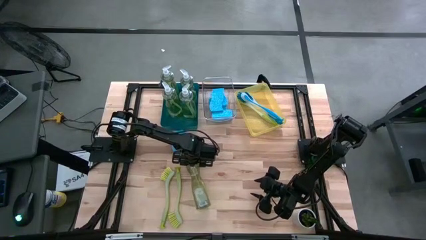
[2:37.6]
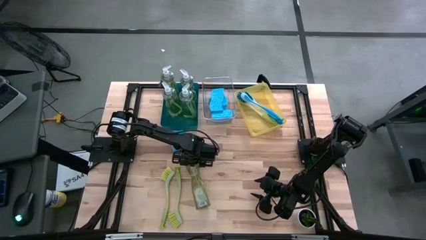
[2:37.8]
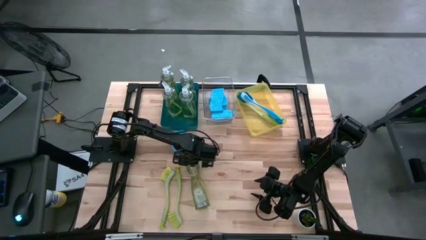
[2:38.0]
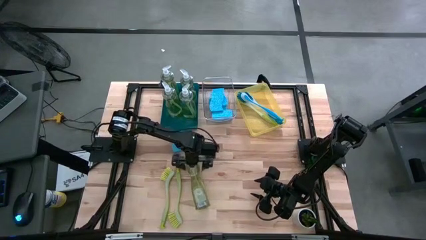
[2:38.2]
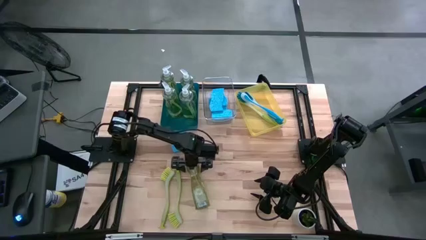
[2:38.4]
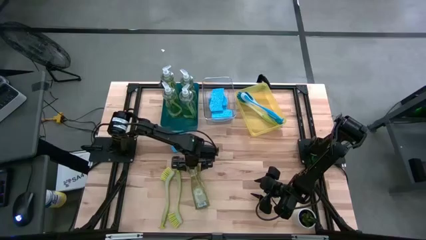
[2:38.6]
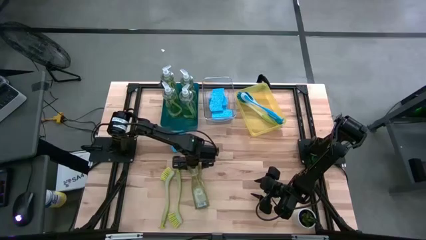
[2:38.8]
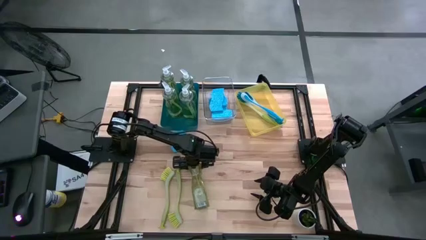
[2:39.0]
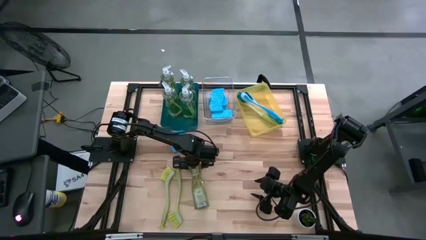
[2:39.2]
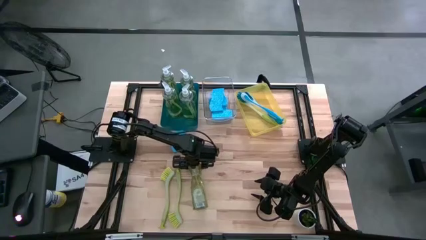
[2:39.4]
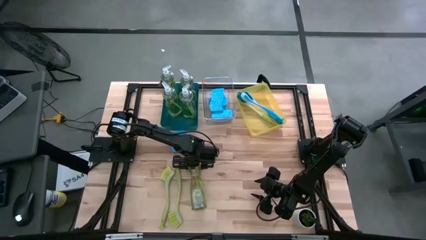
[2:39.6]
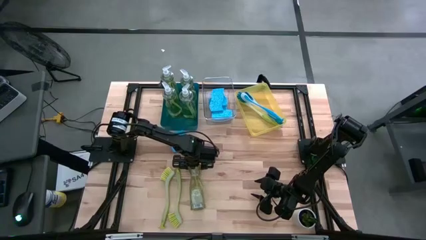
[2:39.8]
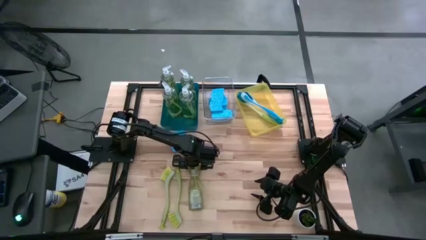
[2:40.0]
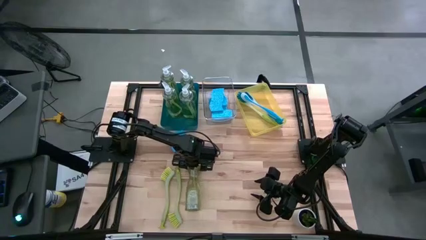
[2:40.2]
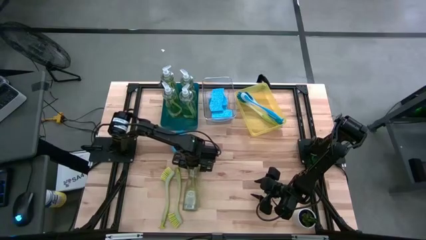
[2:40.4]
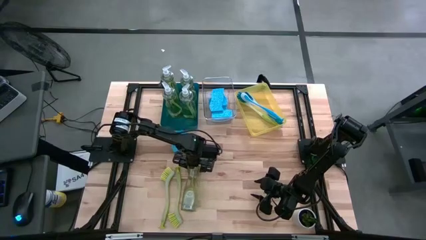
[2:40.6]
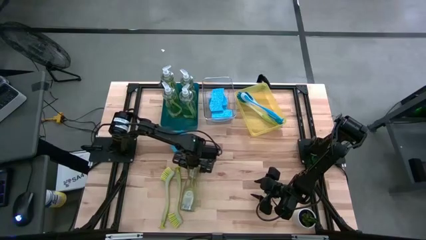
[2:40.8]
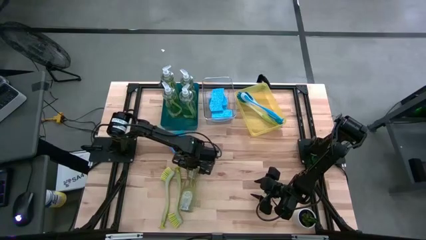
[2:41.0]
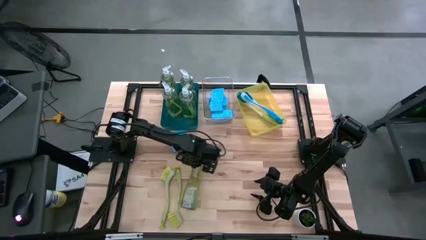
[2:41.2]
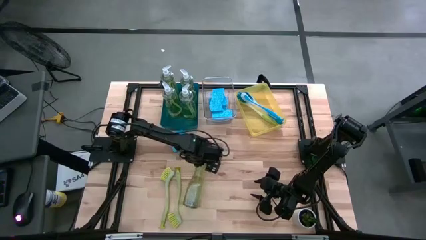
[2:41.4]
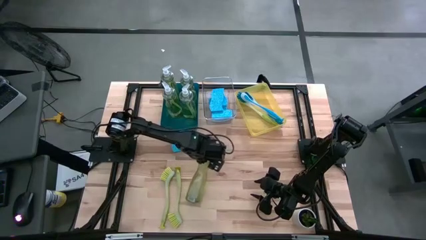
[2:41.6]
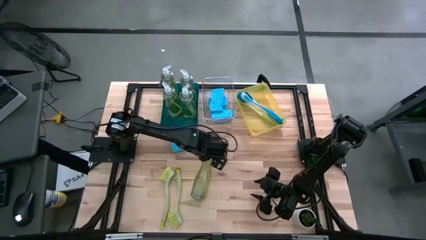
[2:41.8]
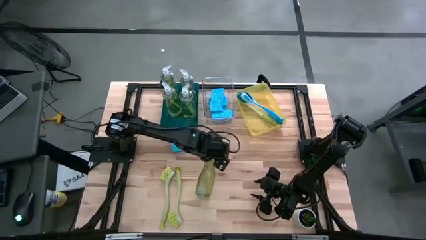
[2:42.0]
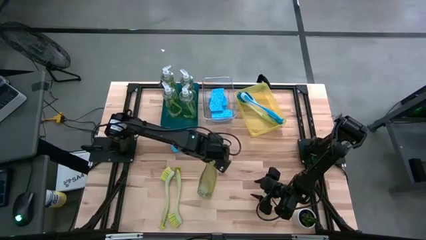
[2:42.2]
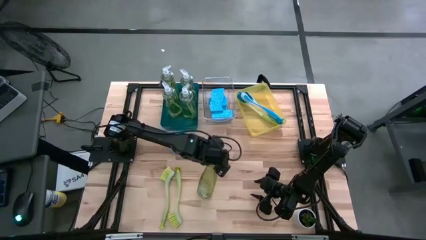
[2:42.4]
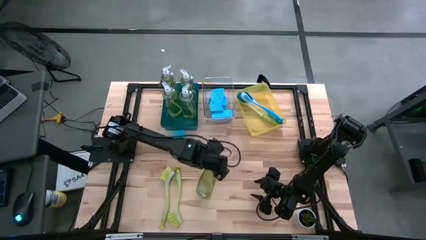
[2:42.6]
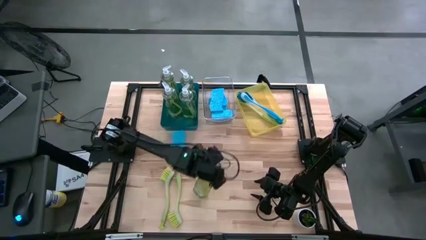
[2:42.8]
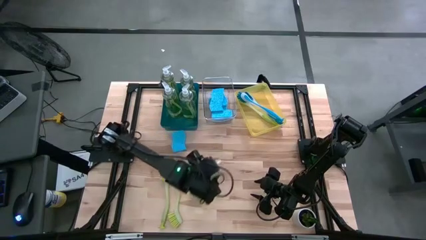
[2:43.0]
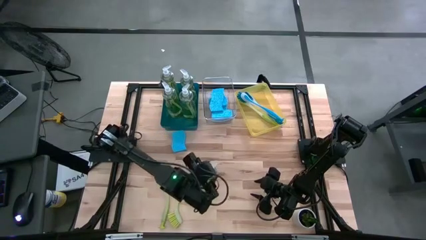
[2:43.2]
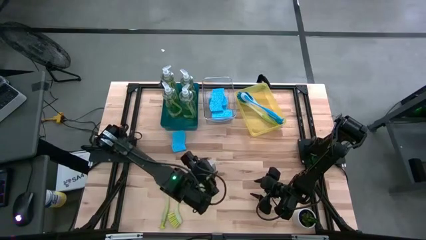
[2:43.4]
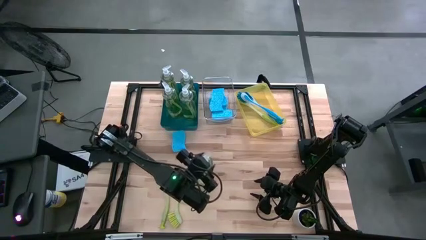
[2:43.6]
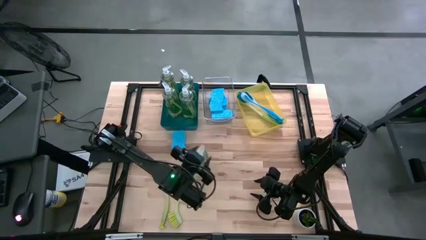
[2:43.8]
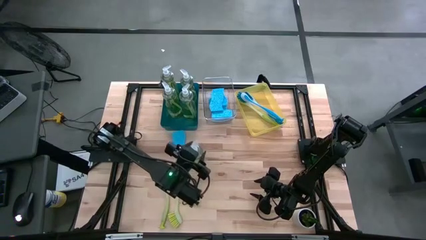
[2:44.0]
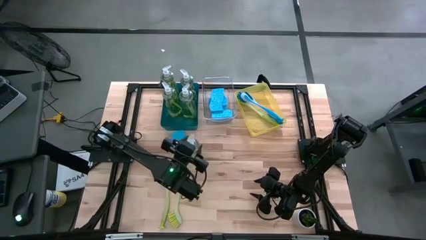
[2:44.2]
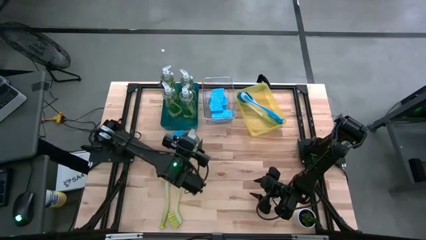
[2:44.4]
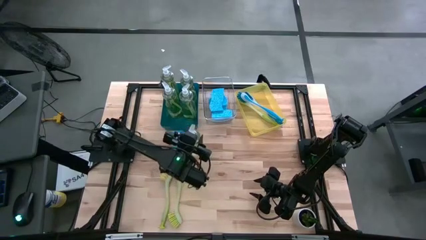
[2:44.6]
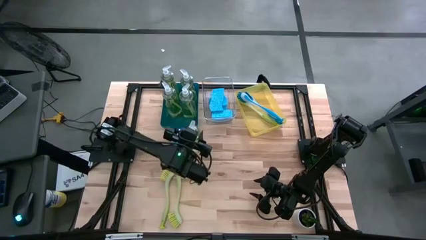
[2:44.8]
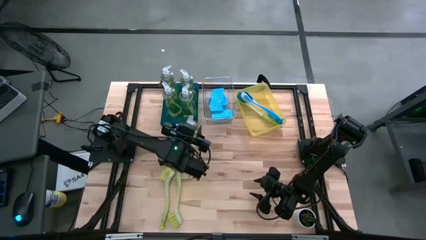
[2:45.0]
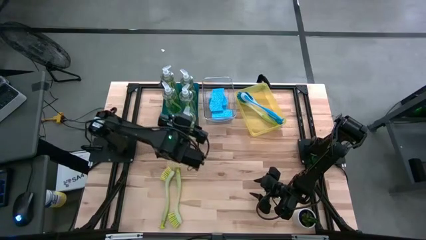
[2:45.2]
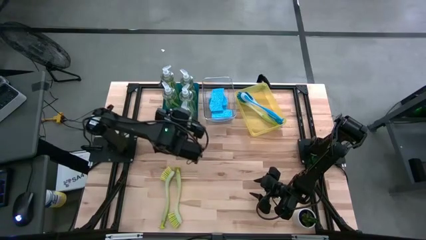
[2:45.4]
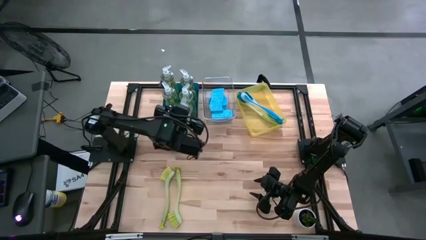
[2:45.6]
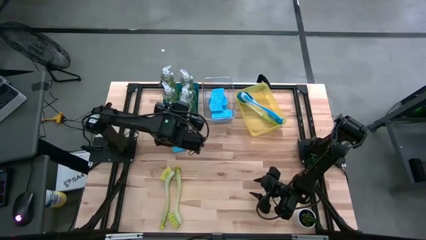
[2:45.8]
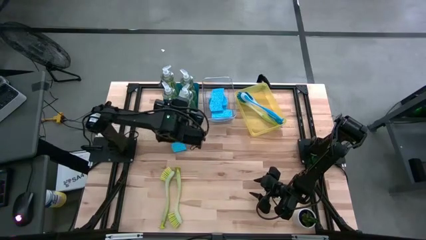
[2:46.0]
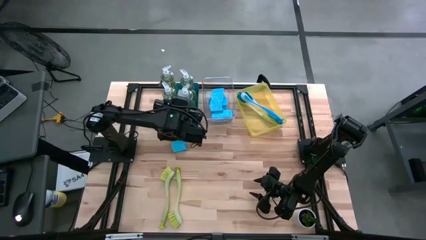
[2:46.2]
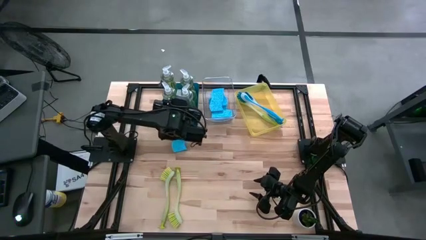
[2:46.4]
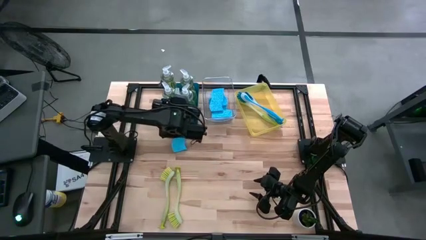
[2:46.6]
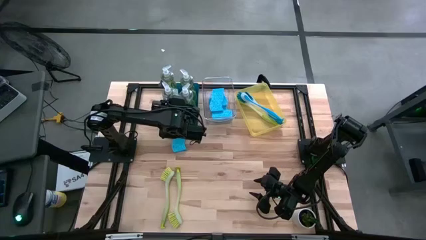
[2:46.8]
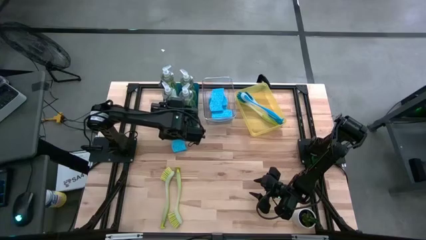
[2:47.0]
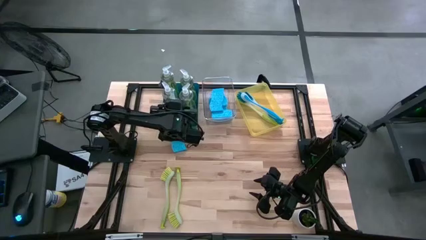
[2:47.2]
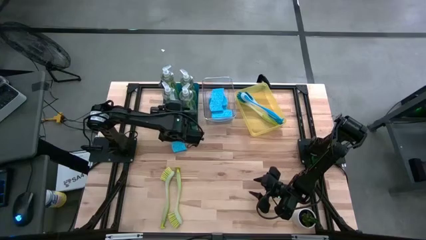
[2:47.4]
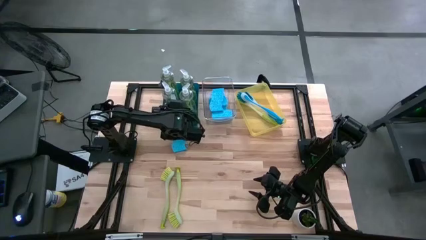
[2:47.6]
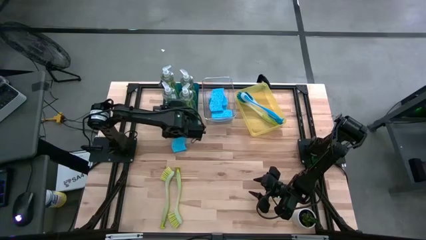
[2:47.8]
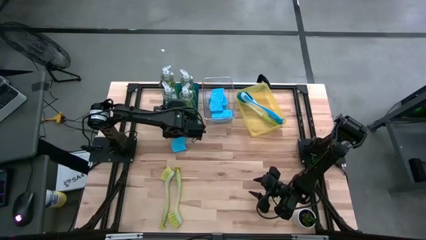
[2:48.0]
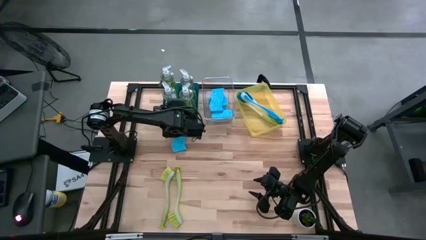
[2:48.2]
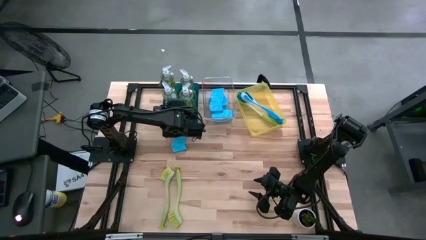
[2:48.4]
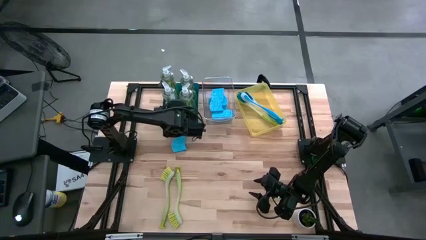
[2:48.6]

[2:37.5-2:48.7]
Task: Pick & Place Kitchen Sink Supplies
Put the dishwashing liquid into the blue bin

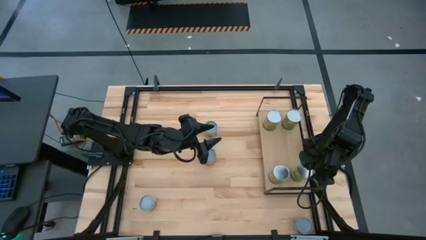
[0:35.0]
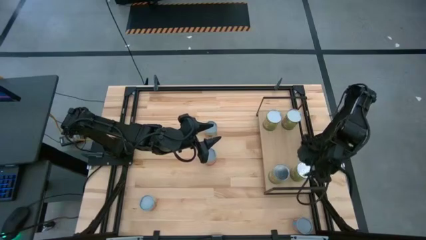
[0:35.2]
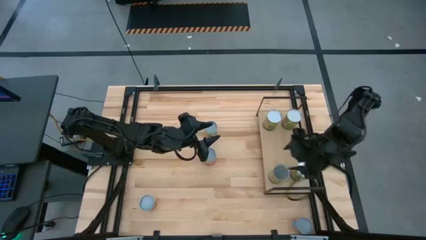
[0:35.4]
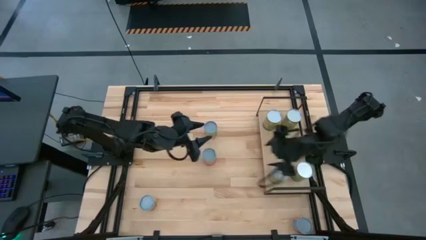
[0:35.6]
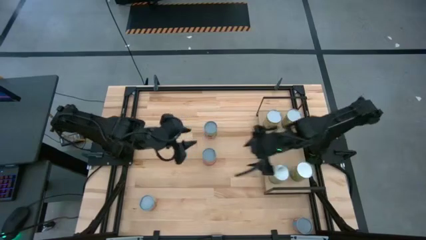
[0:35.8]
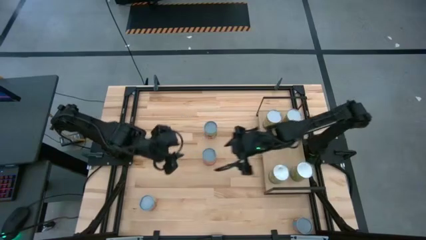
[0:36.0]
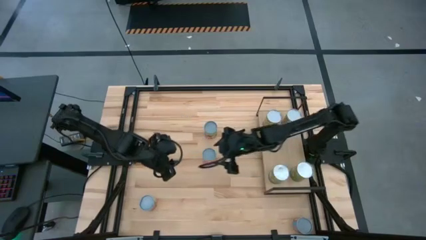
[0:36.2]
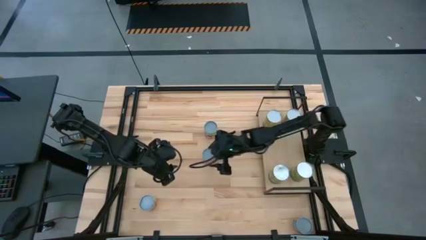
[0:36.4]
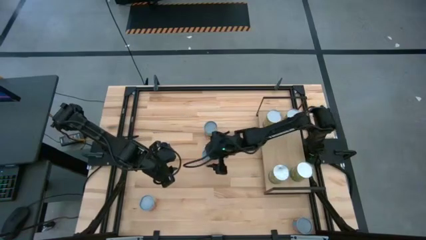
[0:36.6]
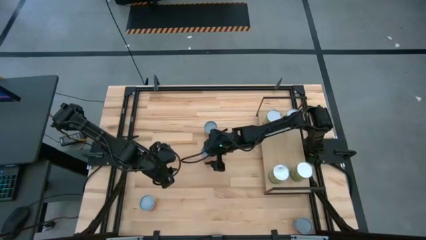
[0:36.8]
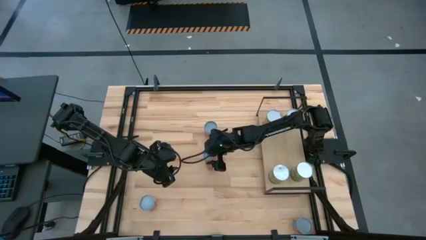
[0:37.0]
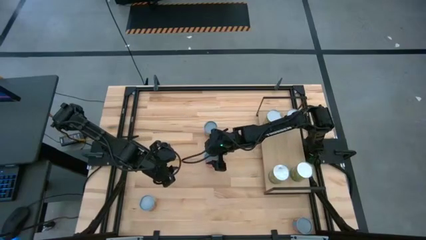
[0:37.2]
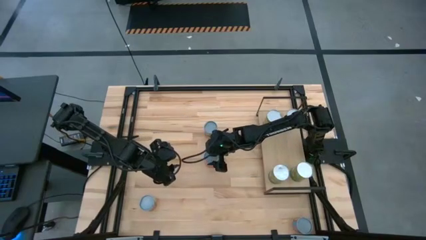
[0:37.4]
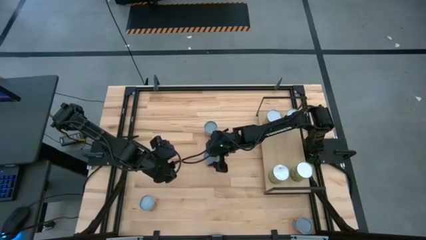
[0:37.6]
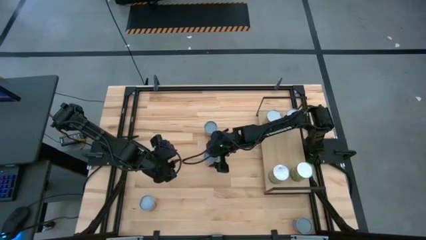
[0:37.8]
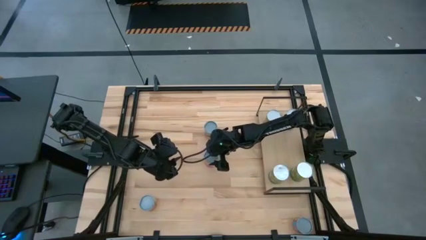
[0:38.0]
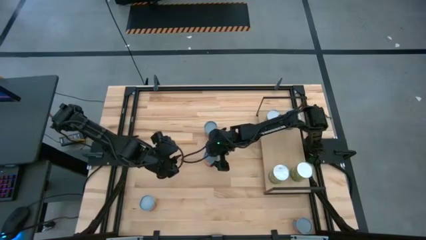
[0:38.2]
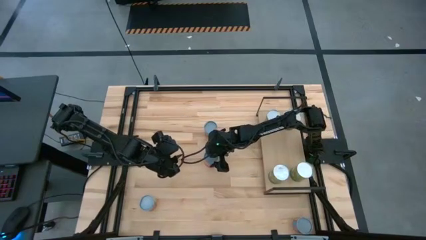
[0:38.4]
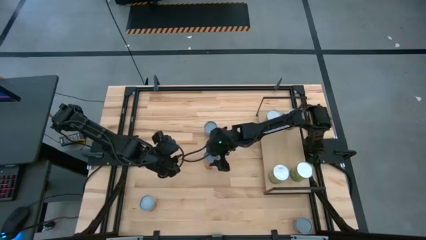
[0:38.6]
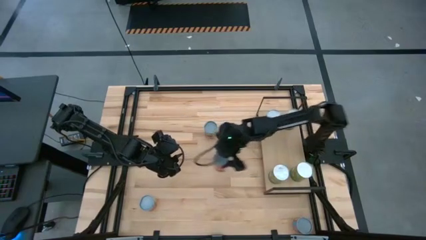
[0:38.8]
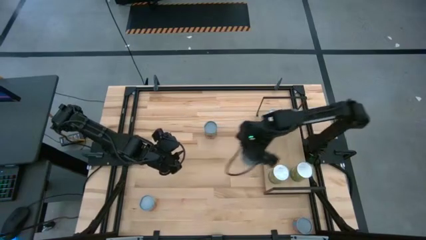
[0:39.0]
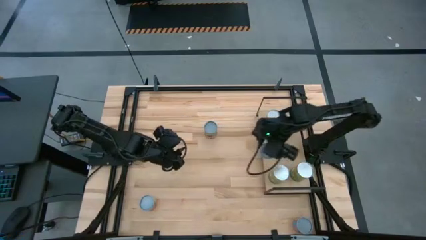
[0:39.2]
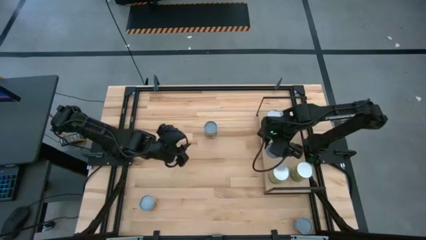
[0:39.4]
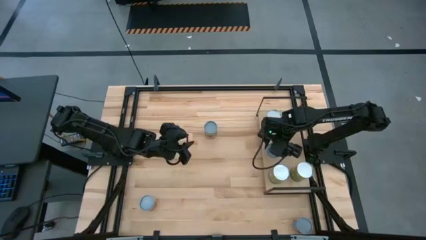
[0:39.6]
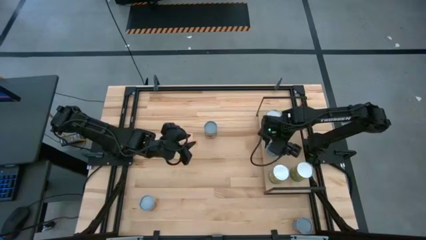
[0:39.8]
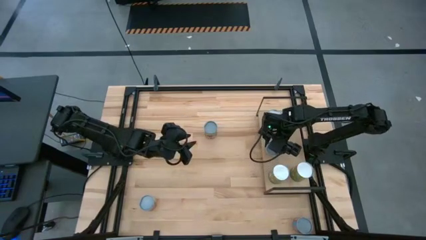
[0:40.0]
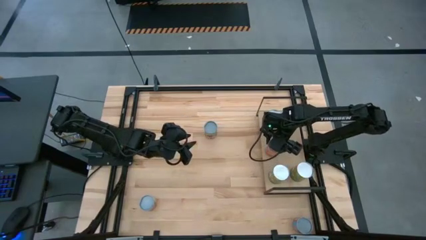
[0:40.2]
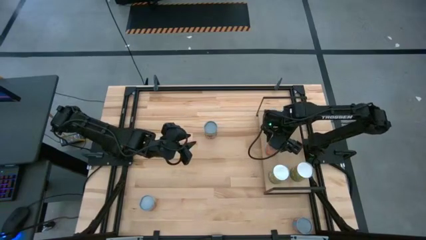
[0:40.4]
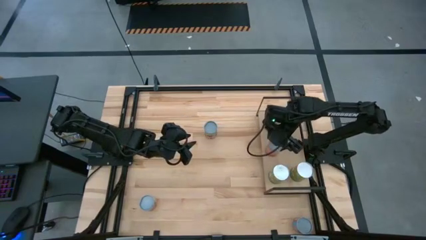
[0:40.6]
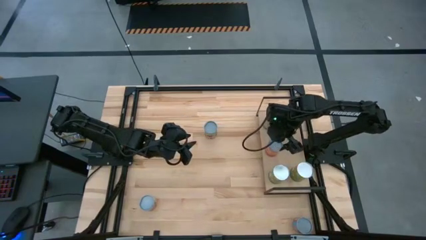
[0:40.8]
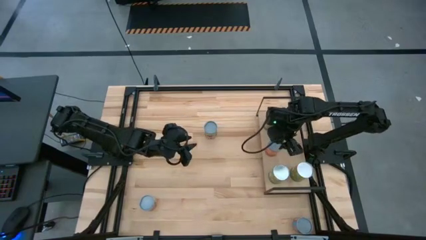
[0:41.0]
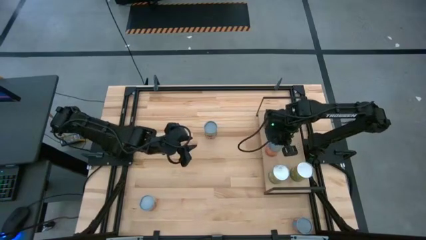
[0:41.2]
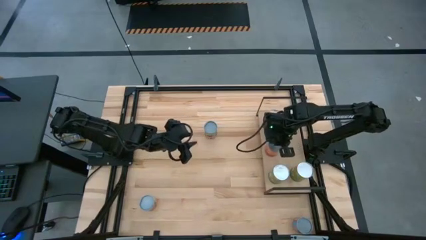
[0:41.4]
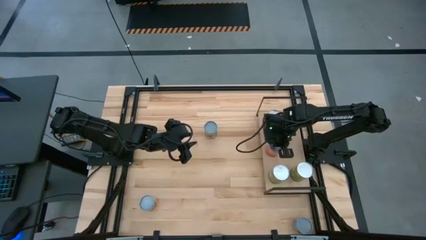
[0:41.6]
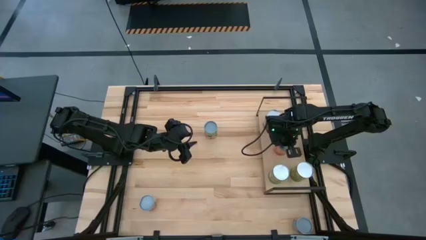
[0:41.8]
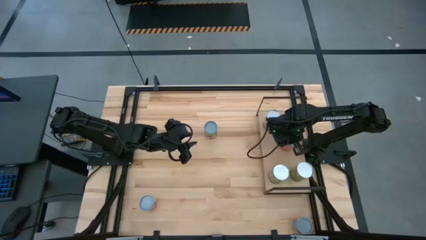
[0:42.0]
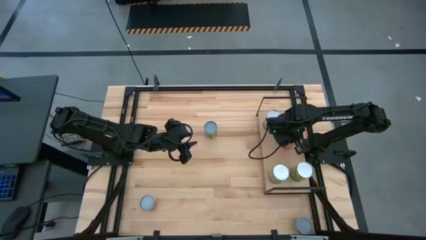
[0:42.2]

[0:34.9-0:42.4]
Task: Pick and place cans onto a shelf
Put the canned mixed fruit on the shelf
